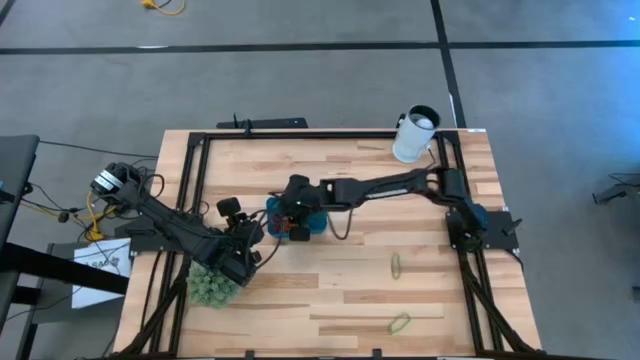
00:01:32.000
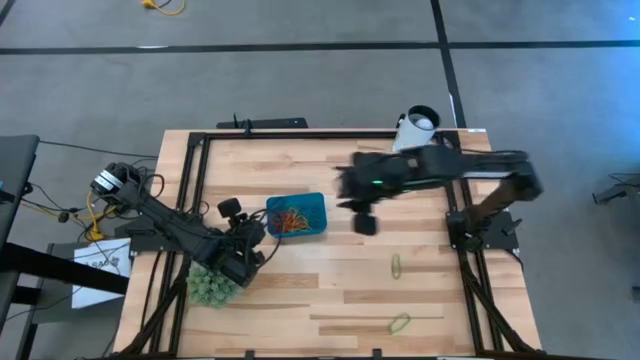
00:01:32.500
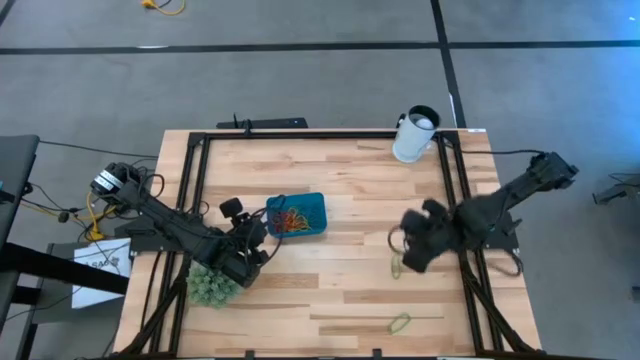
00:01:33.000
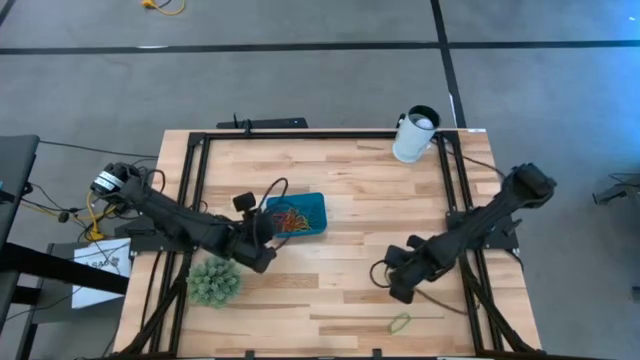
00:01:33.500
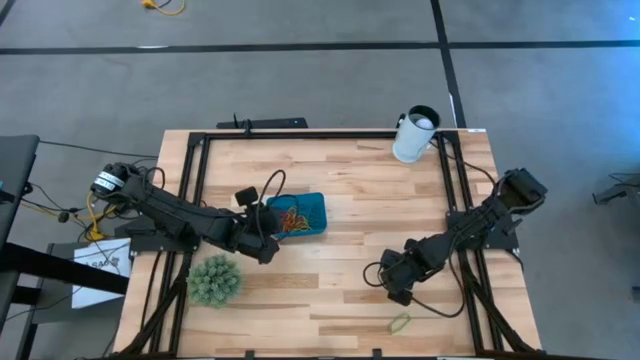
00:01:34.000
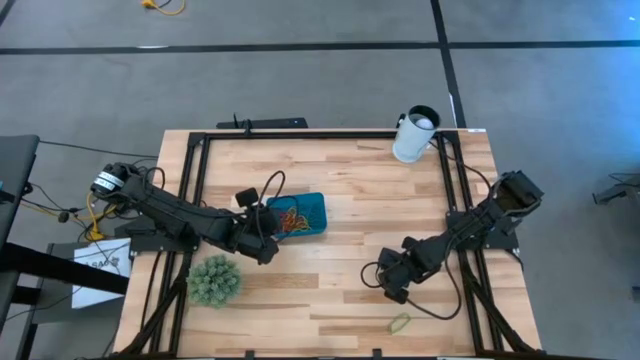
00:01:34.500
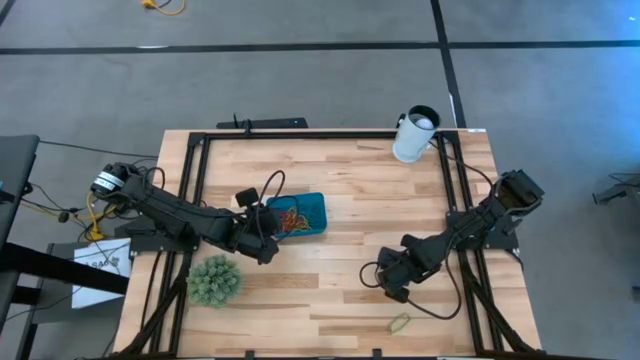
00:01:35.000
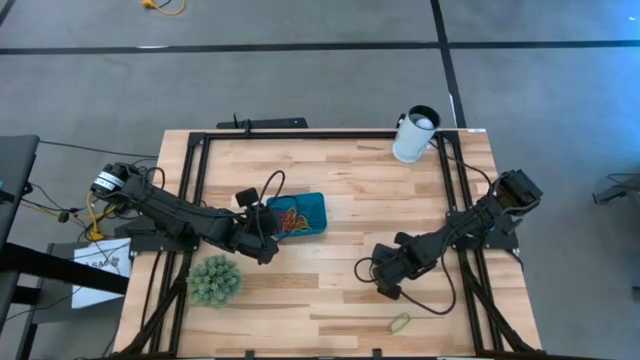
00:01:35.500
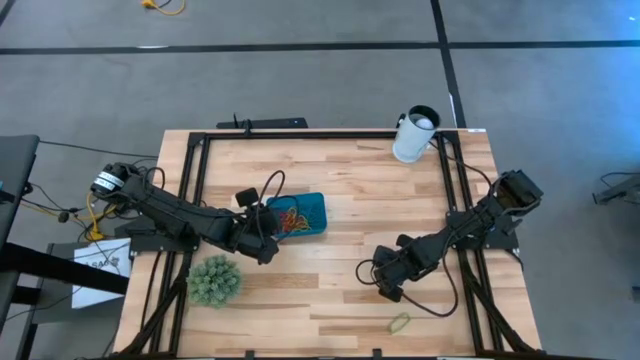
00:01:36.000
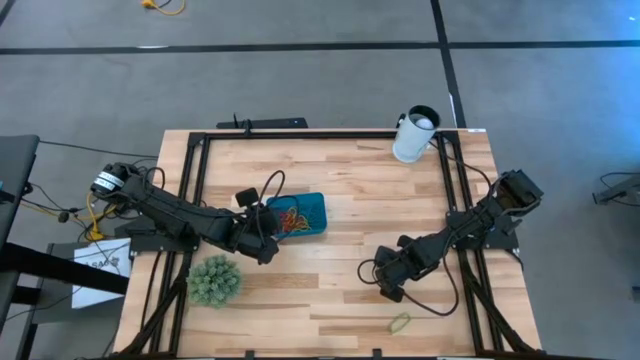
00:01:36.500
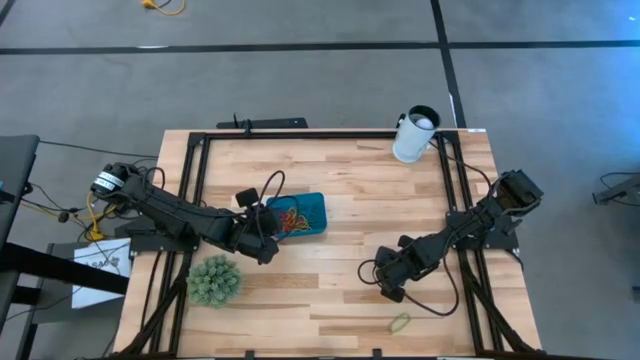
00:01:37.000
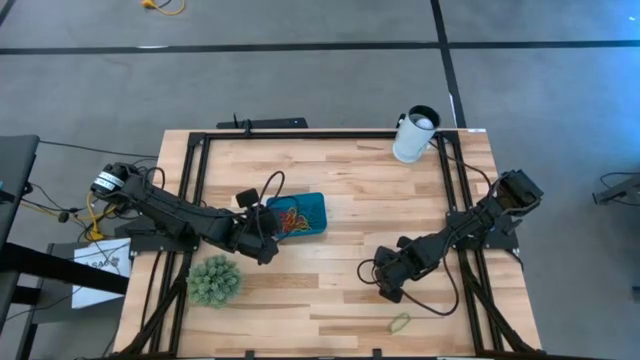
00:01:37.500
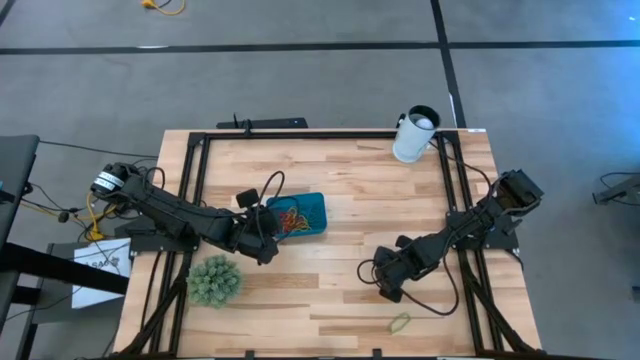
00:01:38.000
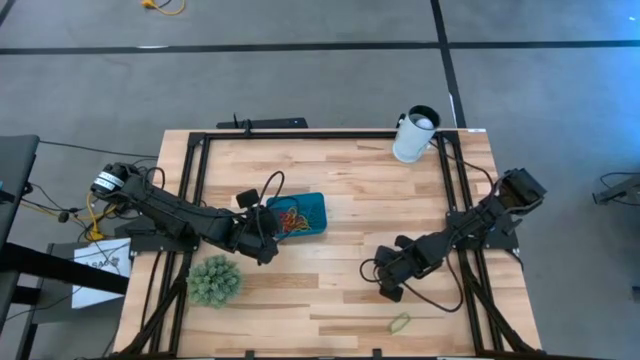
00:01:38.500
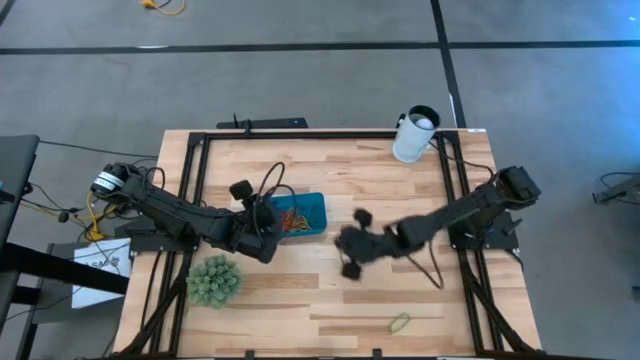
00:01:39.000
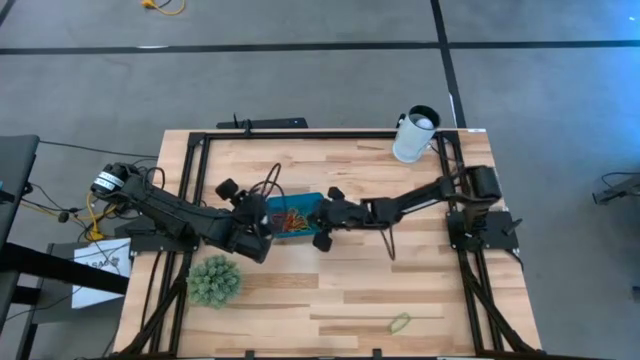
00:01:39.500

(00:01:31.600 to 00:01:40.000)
Task: Pick and place items into bin
Put the green rubber band into the blue bin

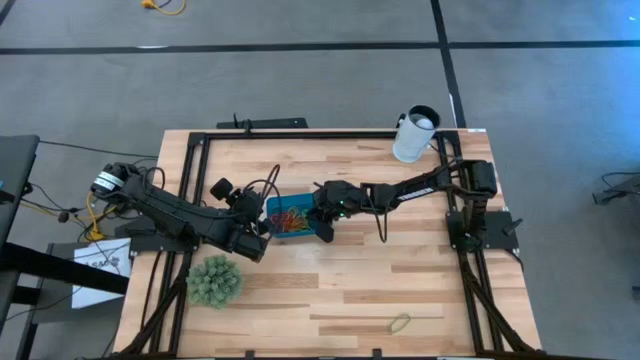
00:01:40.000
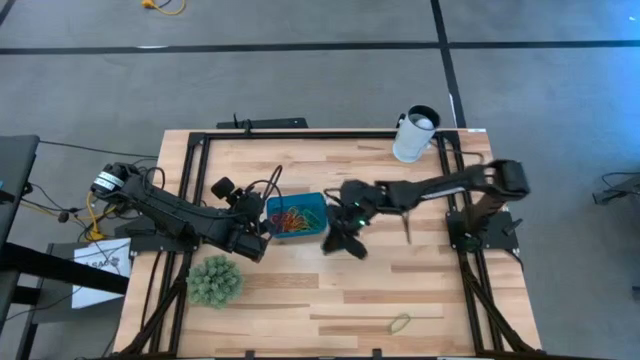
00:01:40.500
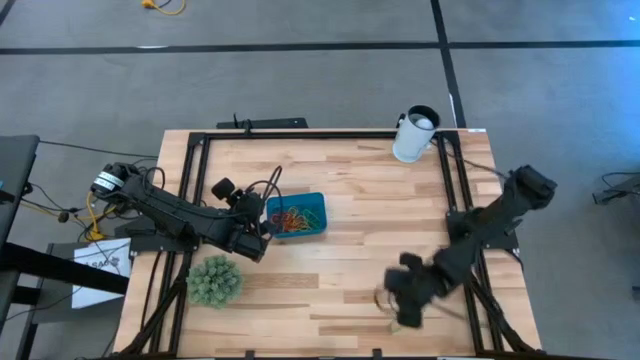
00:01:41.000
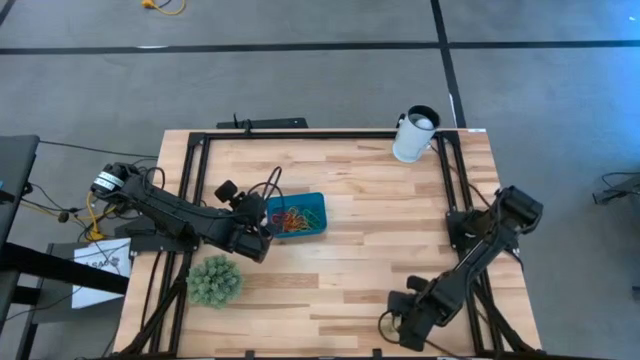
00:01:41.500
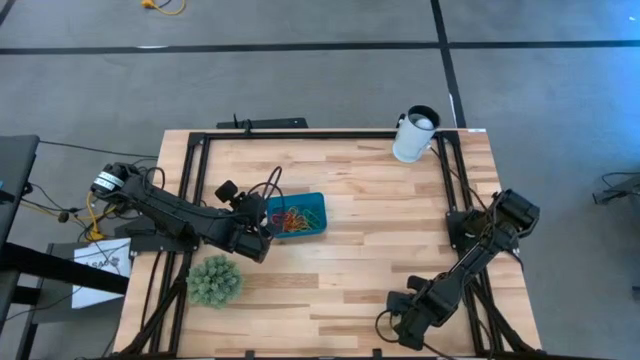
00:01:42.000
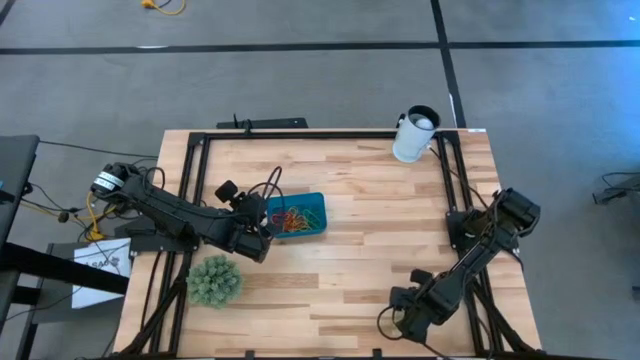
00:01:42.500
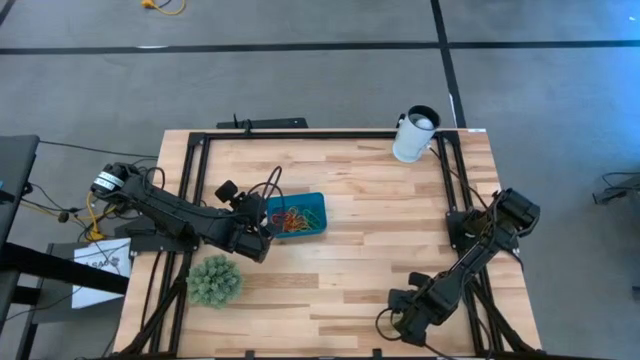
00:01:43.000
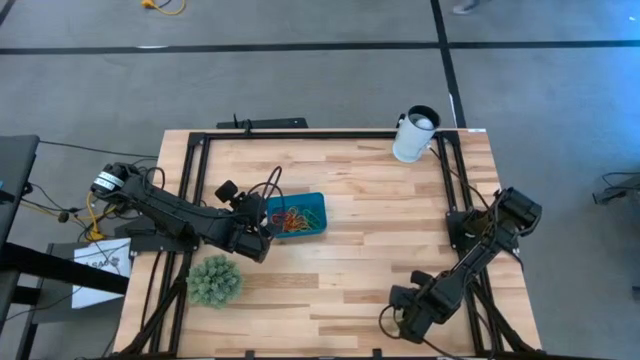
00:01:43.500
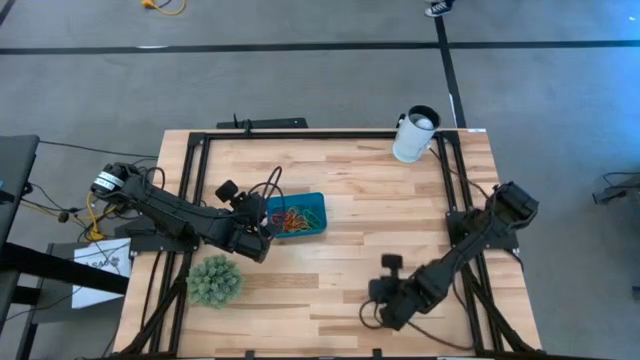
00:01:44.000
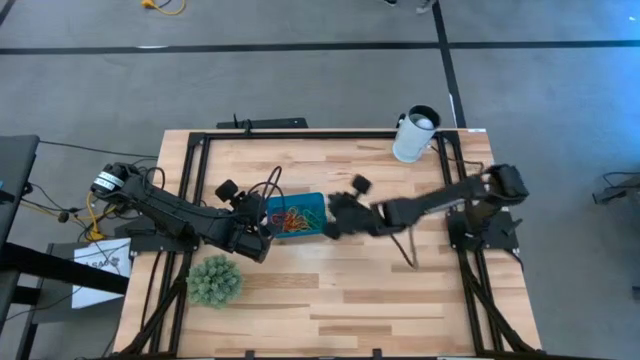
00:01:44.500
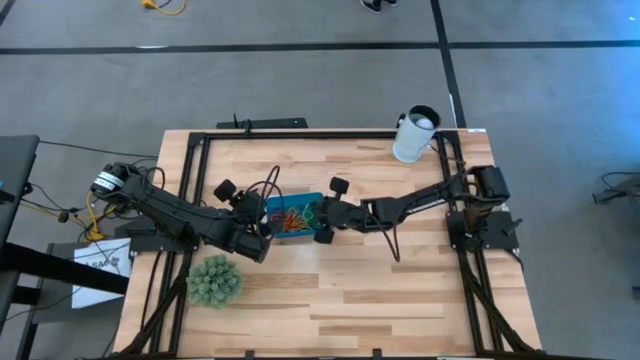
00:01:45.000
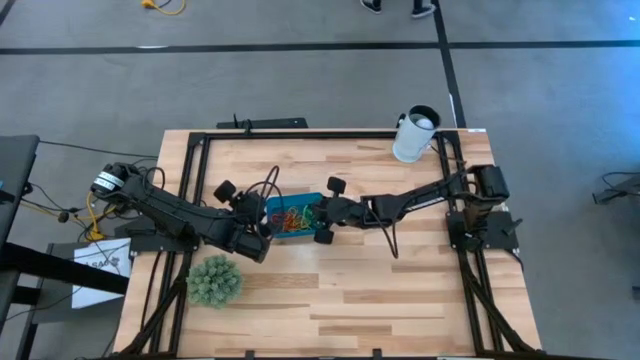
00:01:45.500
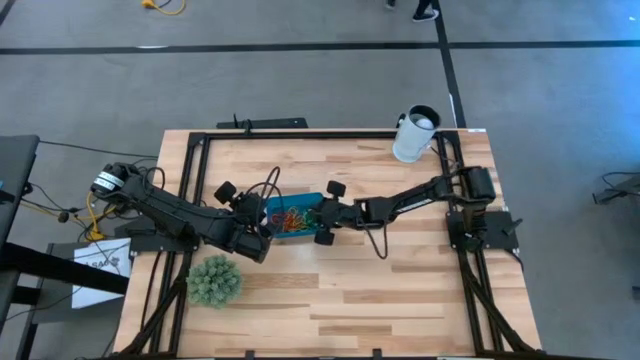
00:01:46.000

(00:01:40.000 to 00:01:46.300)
Put the green rubber band into the blue bin

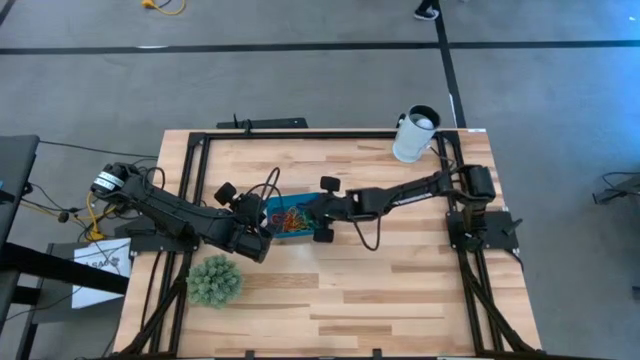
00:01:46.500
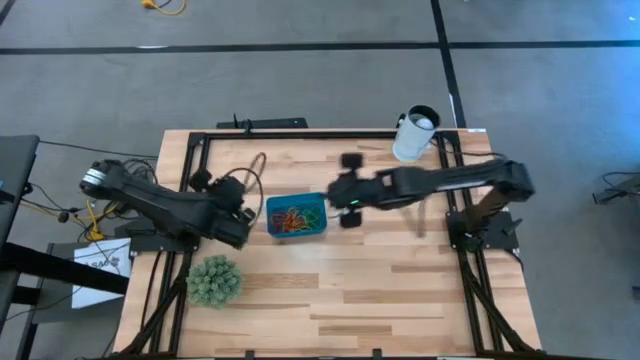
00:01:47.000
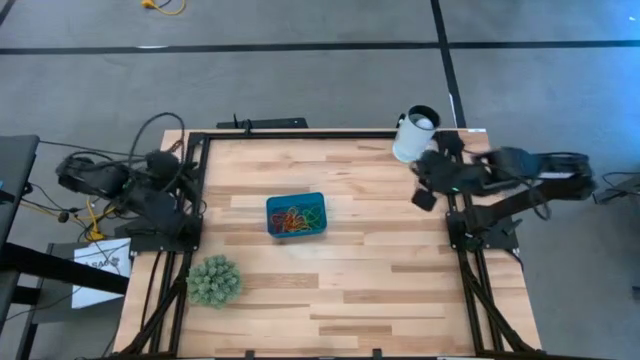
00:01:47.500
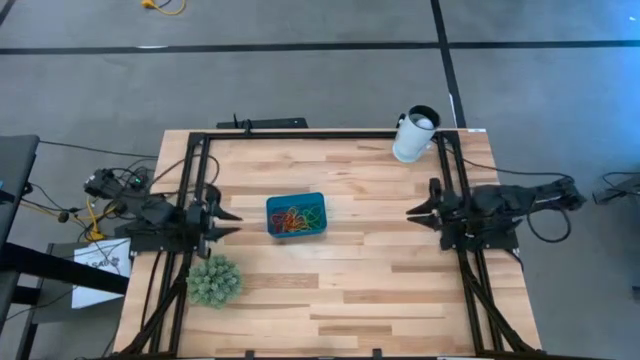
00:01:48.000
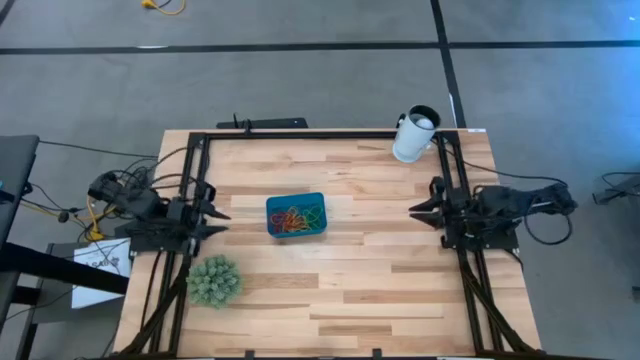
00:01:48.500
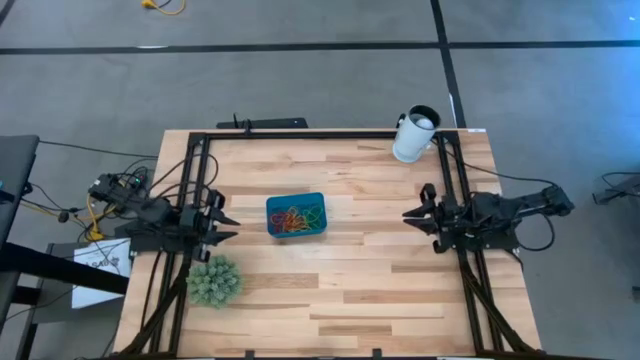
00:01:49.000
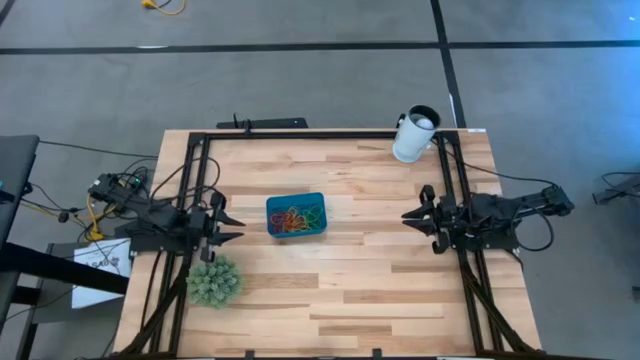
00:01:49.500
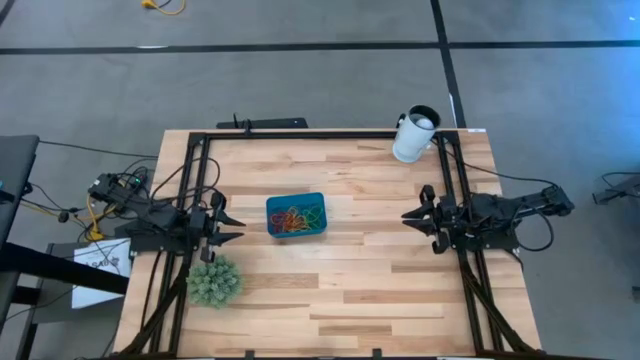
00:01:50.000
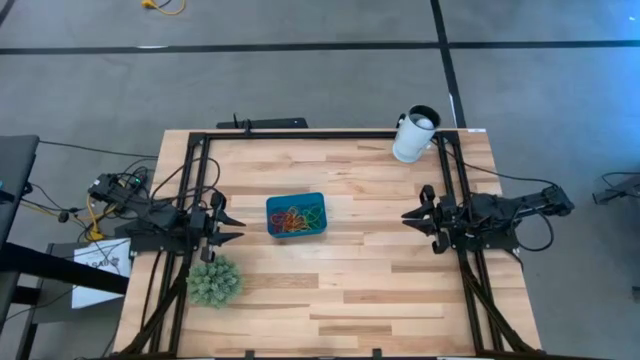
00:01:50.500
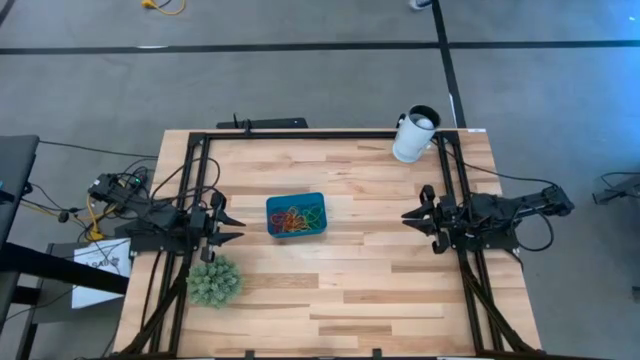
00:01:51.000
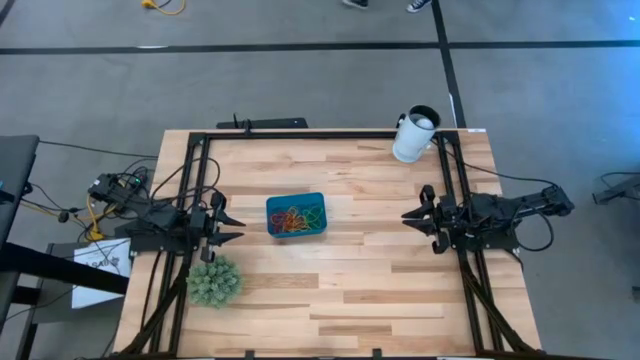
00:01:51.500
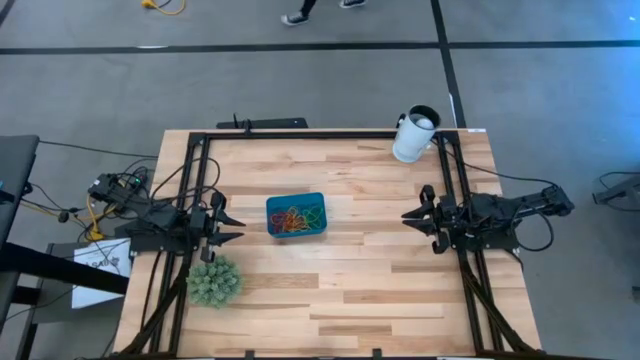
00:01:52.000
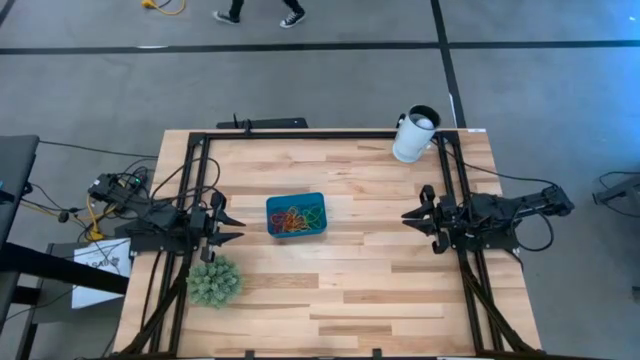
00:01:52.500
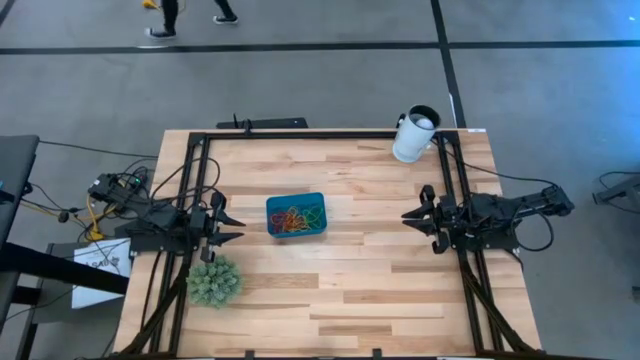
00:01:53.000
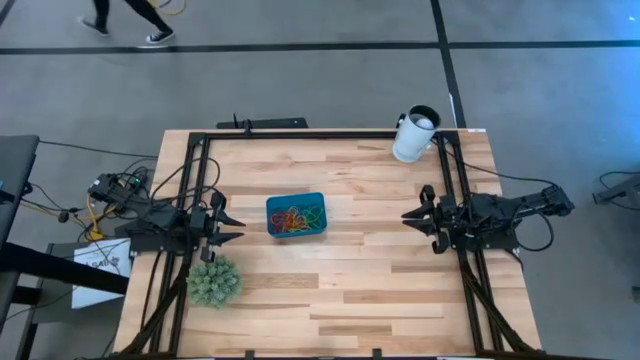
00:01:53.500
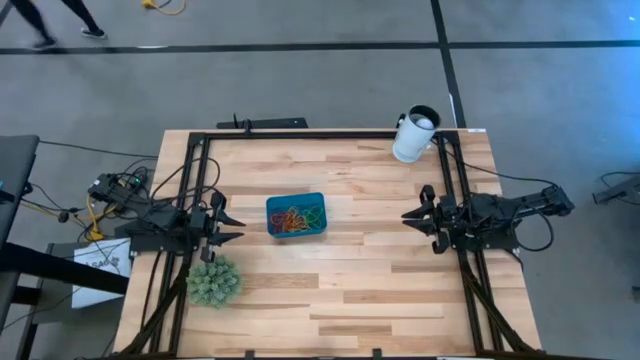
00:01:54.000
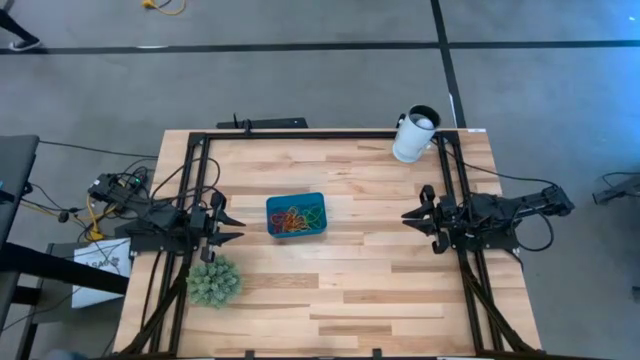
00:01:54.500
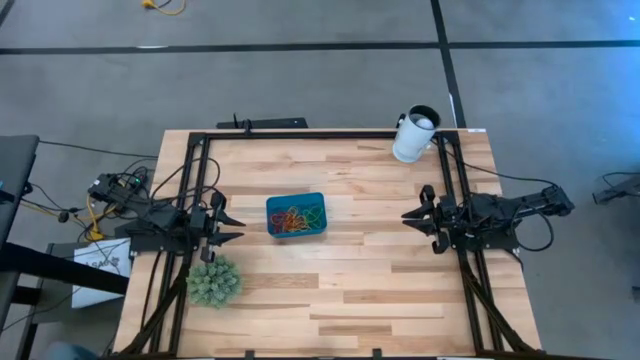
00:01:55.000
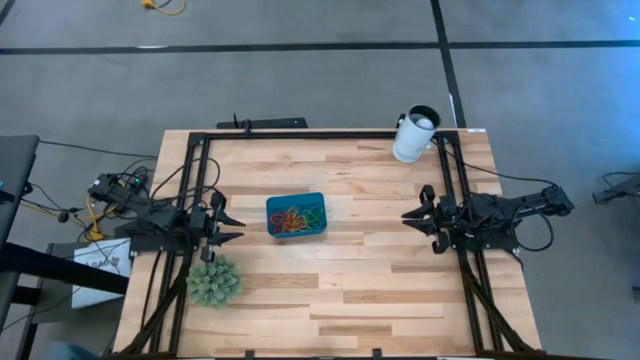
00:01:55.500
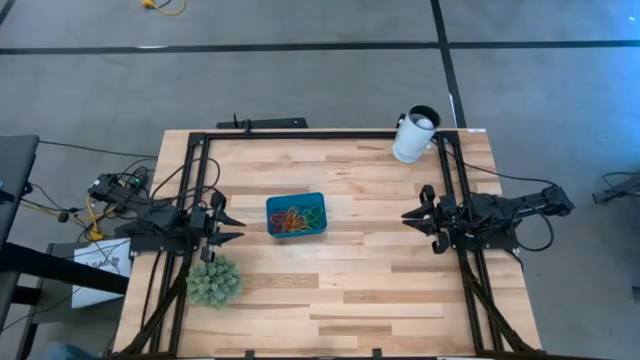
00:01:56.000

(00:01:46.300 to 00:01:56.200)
Return to Home Position
